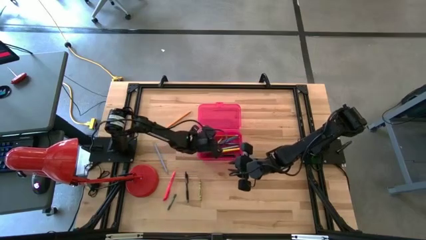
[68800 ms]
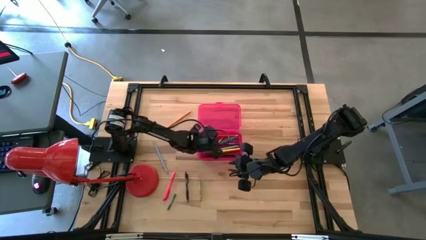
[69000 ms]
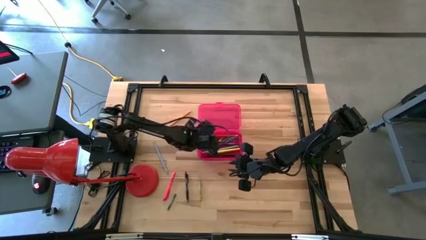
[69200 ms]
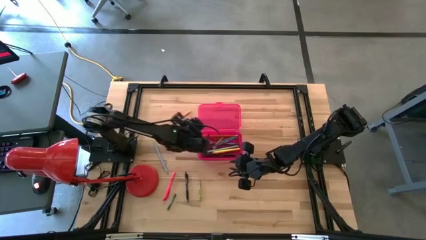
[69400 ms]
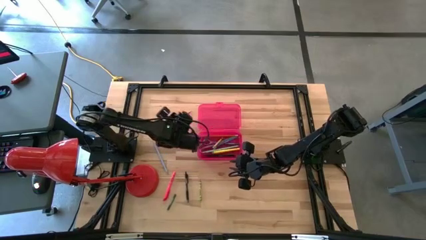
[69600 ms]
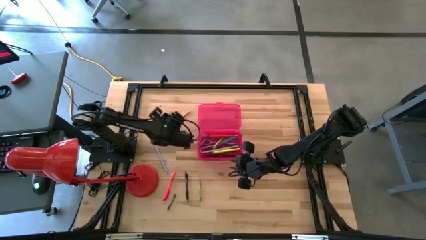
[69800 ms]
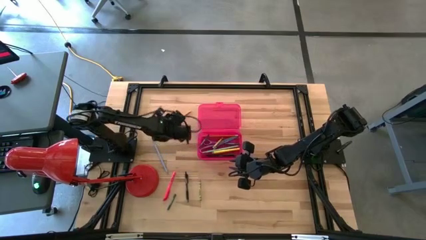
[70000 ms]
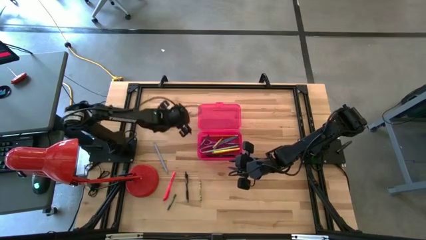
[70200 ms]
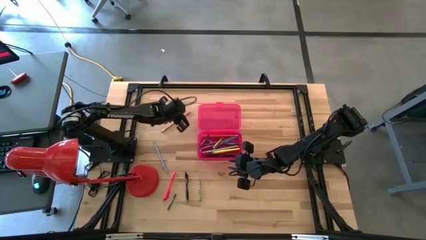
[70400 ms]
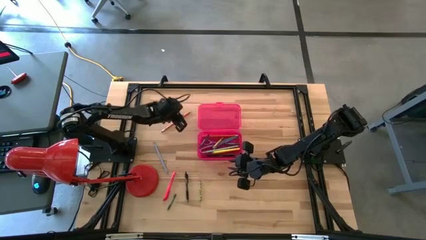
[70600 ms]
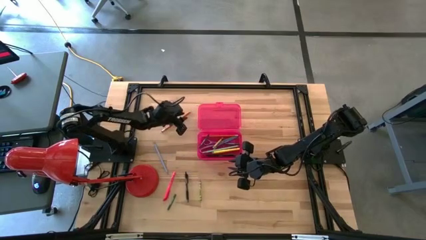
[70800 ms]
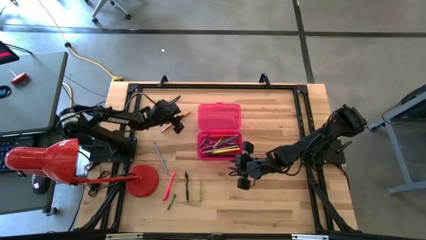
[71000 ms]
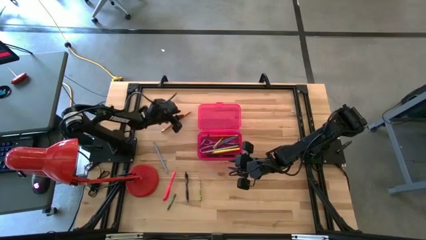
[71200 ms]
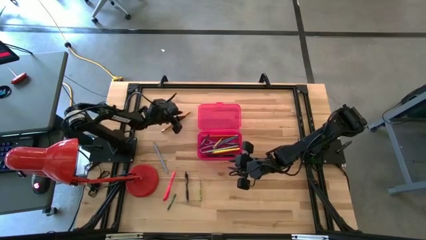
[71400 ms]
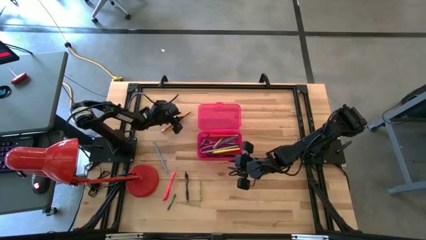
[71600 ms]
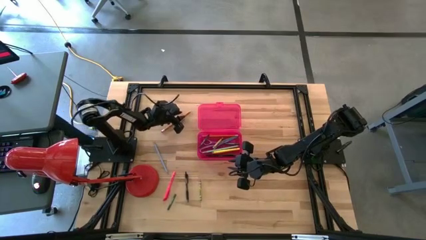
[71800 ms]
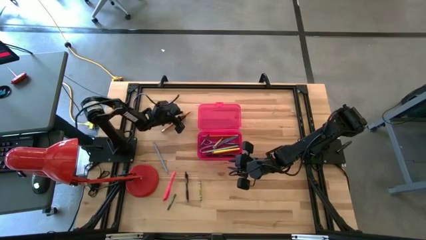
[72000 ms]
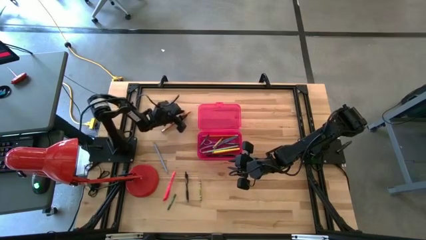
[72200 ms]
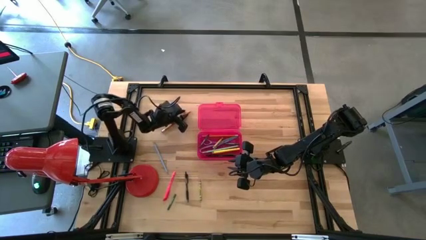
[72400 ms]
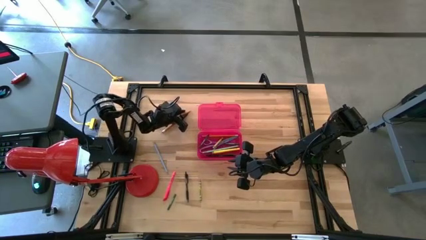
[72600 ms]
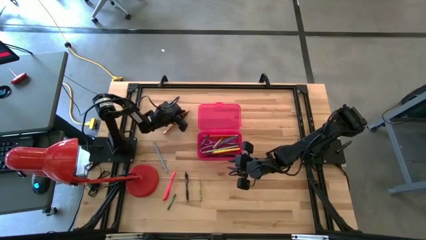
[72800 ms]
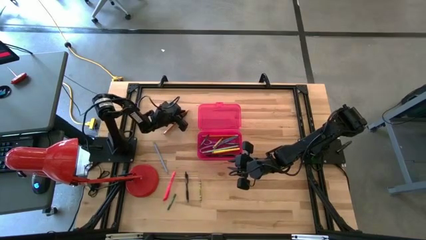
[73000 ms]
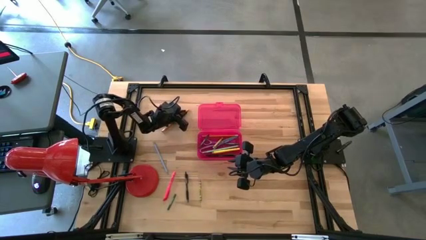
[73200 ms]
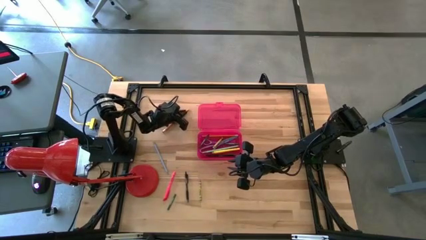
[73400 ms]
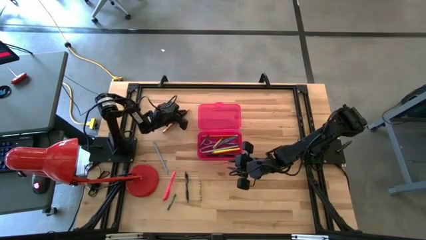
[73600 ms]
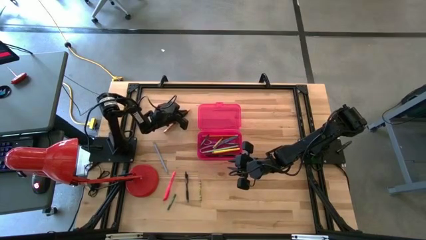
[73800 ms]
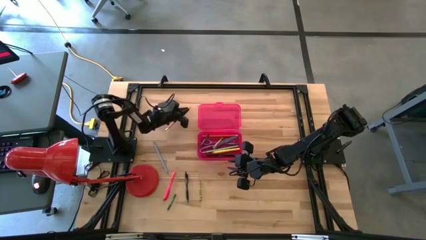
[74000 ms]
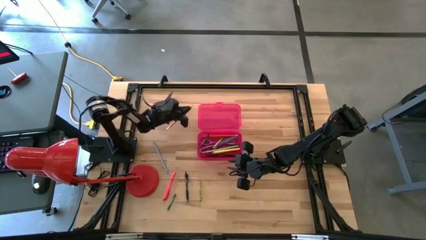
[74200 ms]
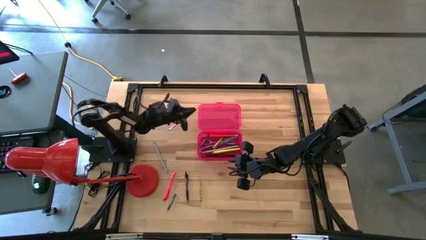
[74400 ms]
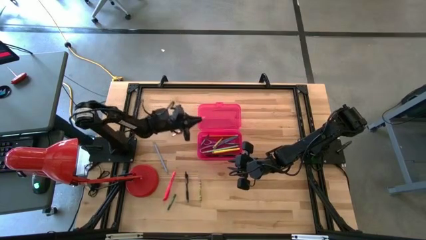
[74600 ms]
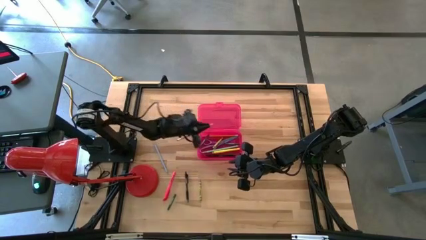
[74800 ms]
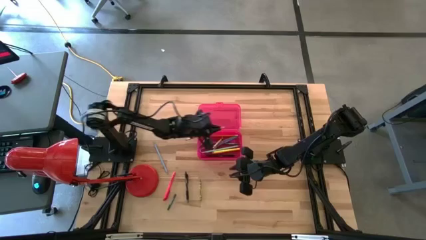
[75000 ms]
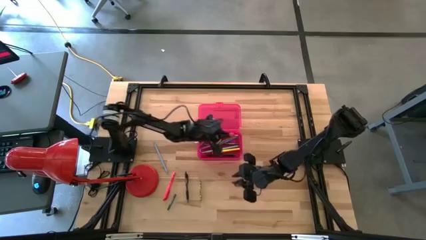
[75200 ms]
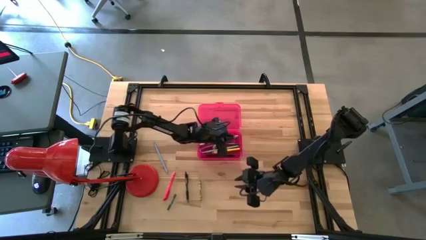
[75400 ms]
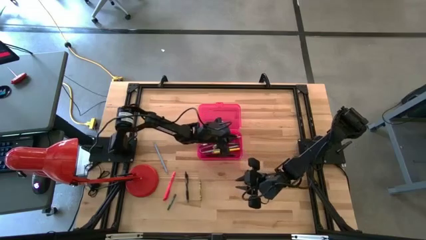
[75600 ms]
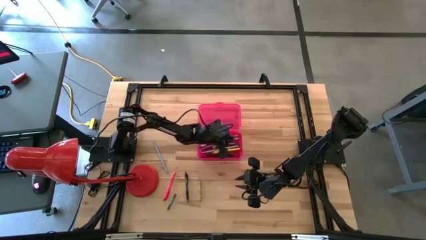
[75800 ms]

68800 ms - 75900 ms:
Task: Pick & place school supplies into a supply box
Put the orange pencil into the pink supply box

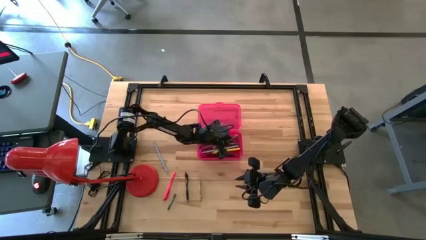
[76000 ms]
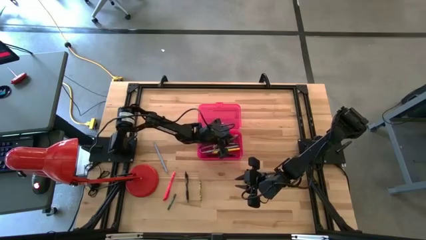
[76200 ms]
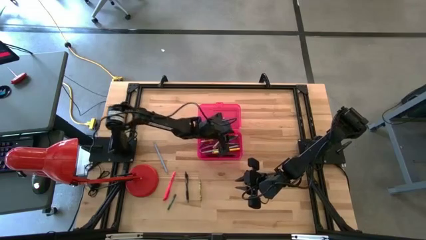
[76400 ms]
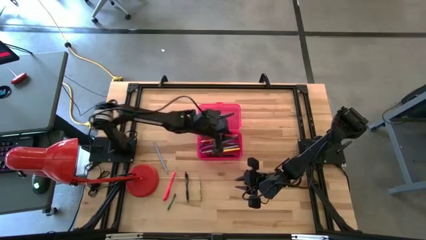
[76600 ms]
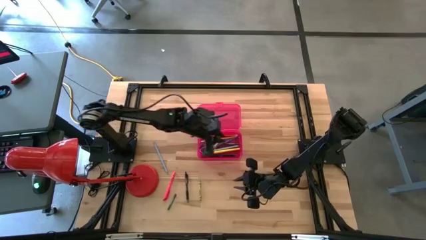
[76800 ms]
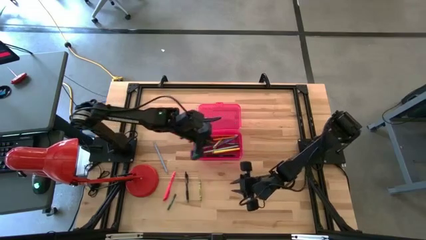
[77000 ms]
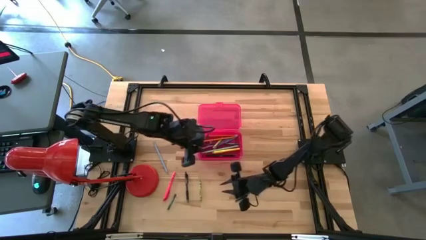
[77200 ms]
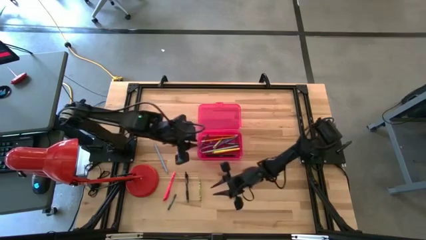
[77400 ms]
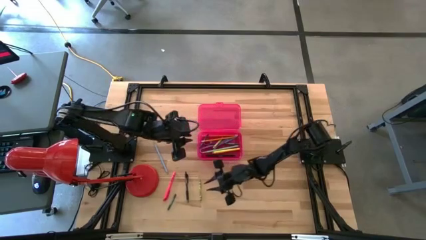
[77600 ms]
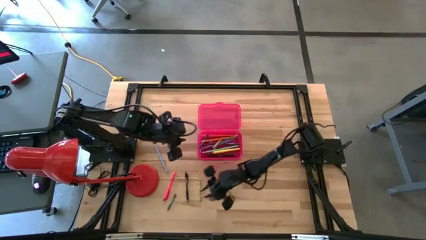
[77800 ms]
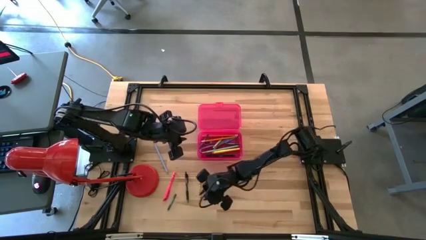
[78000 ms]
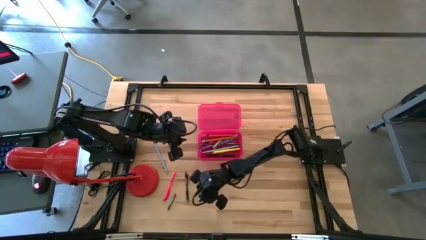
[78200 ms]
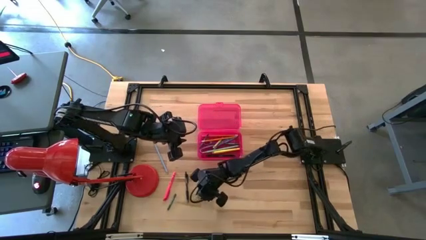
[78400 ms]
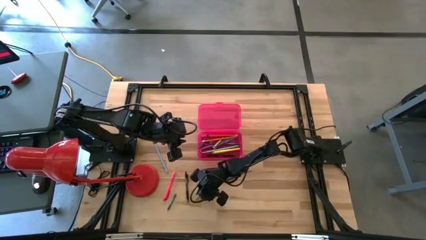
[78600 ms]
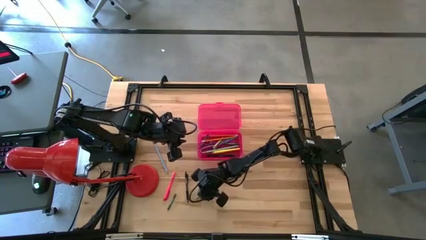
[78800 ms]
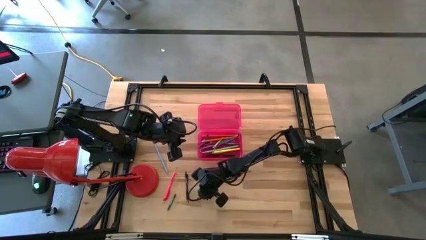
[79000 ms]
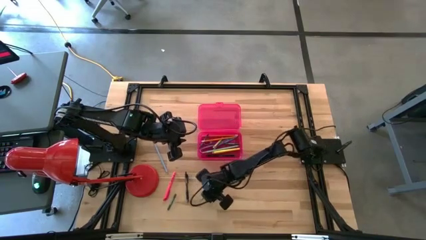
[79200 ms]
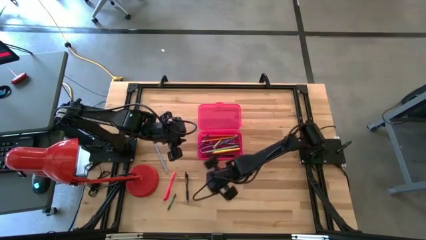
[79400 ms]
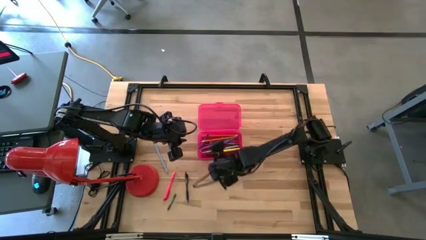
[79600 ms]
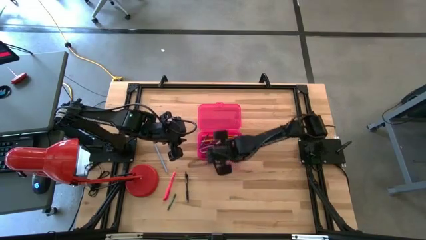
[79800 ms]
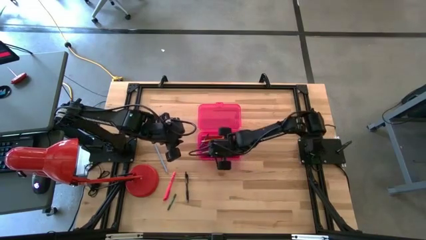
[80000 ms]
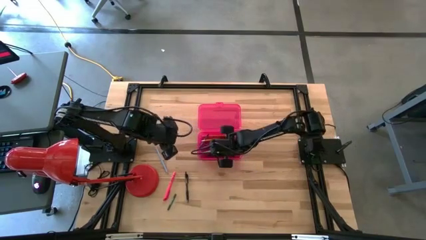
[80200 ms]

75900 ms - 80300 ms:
Put the green crayon into the pink supply box

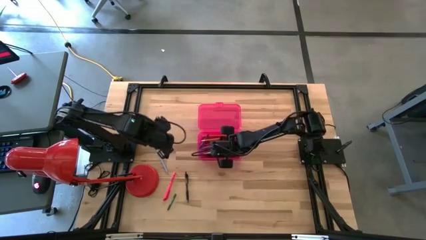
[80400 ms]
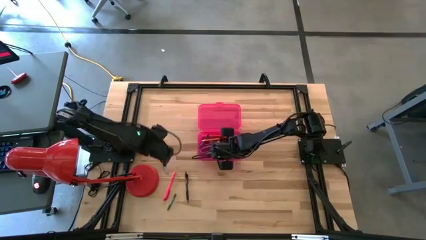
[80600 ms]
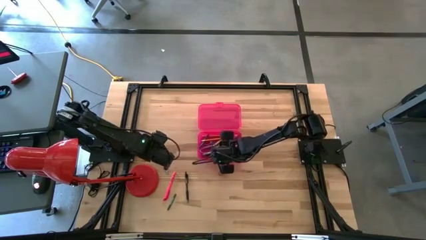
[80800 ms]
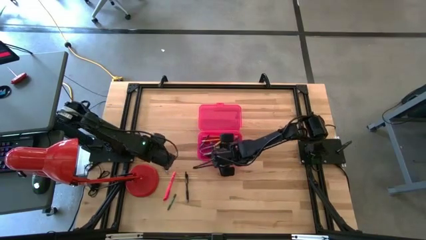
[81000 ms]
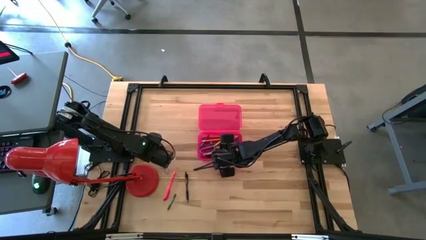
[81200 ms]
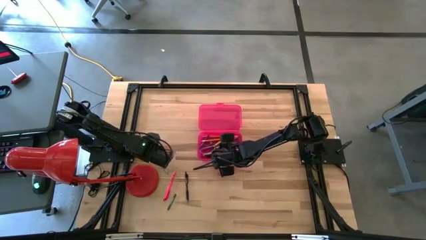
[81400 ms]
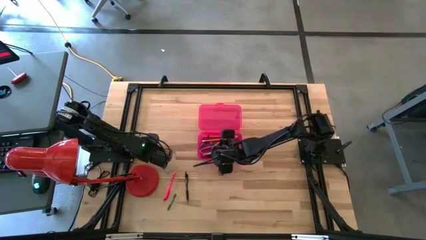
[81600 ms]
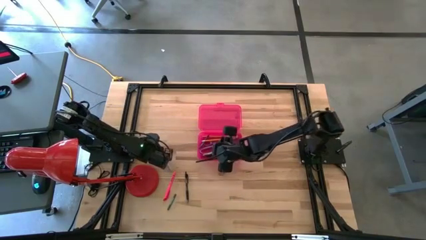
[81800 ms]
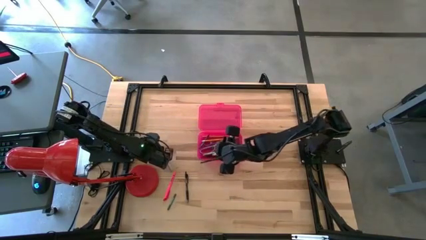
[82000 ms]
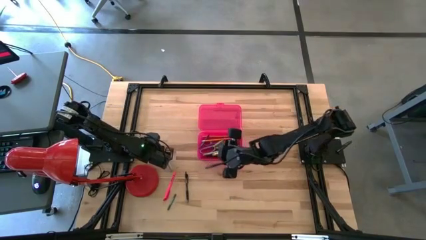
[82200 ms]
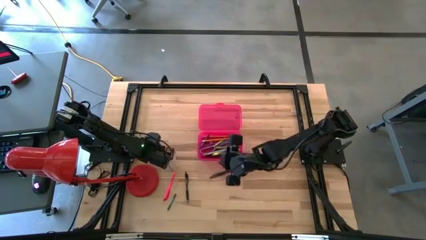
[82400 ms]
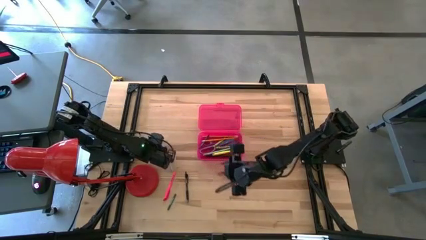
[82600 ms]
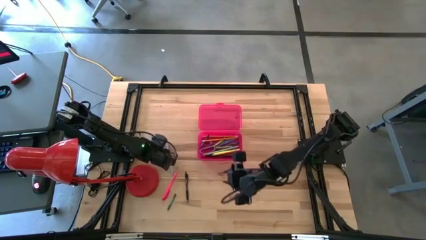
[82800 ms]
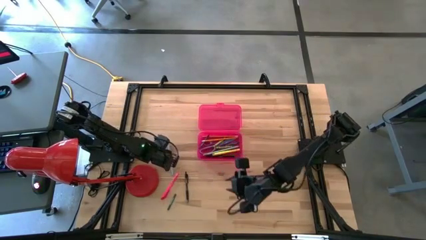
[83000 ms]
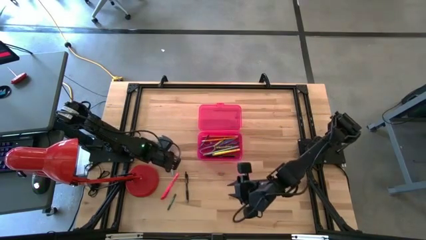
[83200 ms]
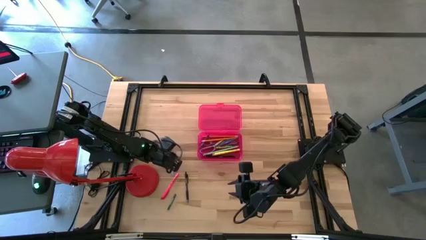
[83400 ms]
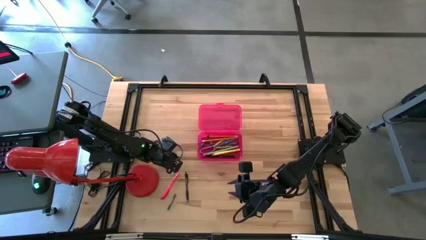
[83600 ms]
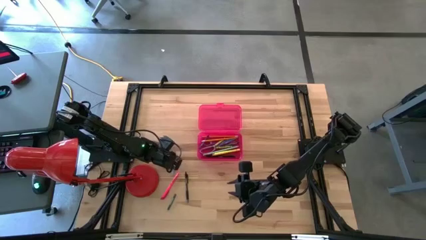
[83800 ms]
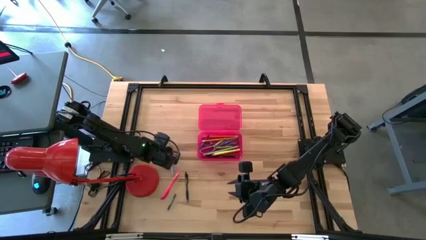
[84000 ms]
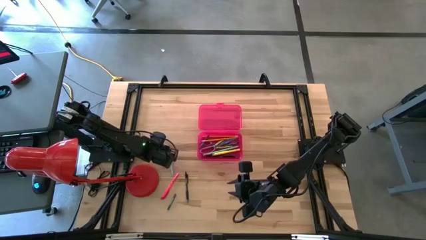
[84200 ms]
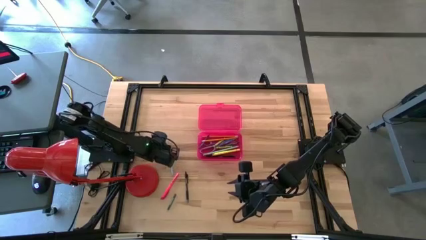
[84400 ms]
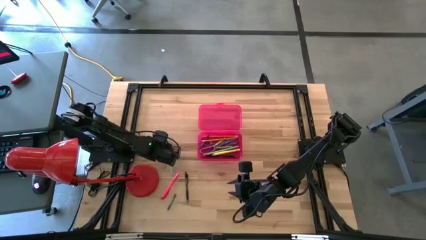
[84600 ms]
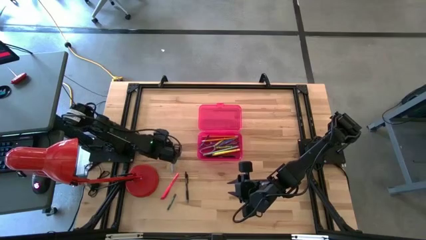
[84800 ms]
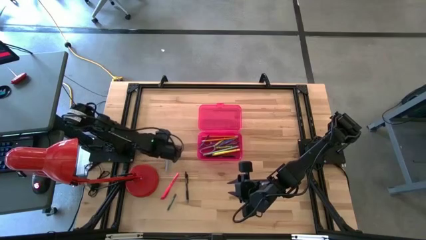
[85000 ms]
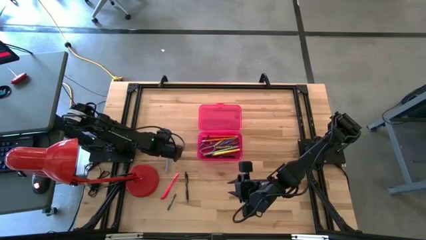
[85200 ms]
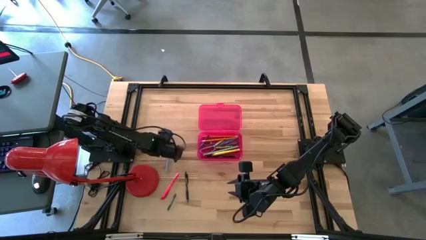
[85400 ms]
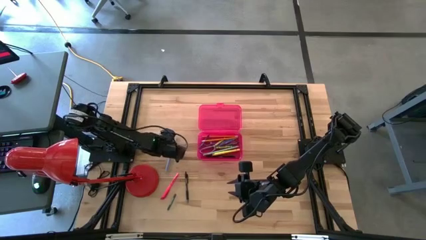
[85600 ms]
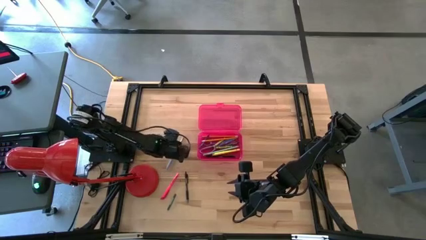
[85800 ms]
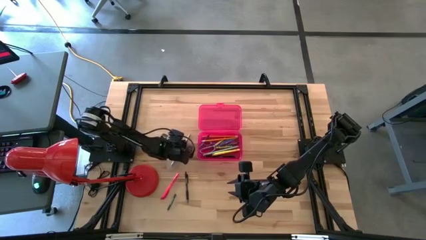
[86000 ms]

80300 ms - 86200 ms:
Put the light blue pencil into the pink supply box
